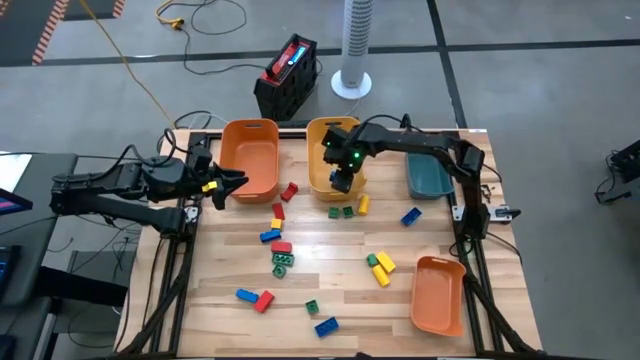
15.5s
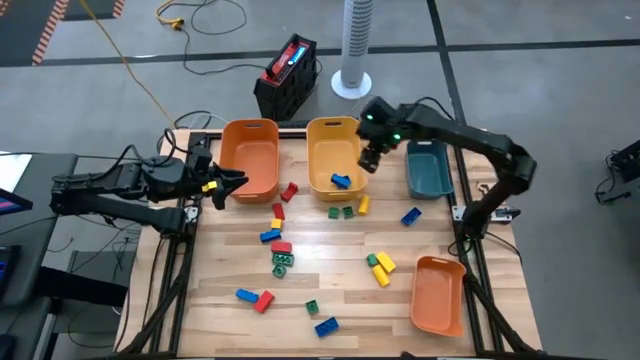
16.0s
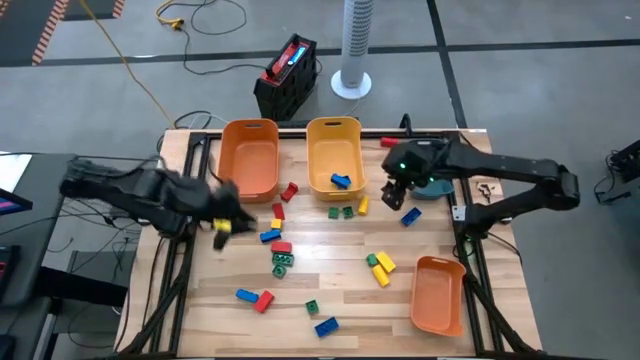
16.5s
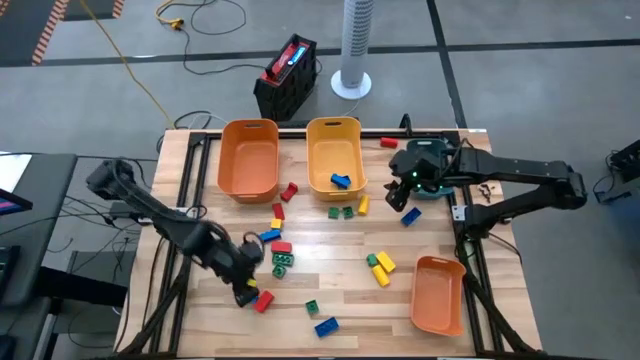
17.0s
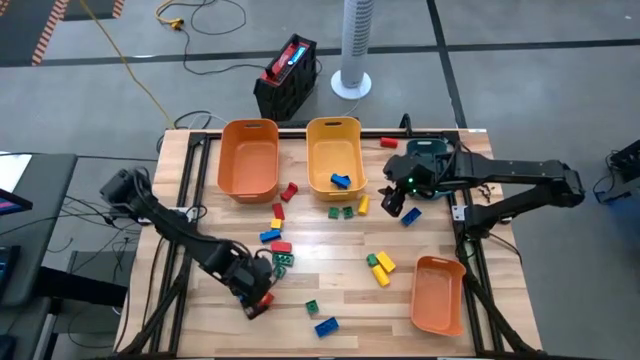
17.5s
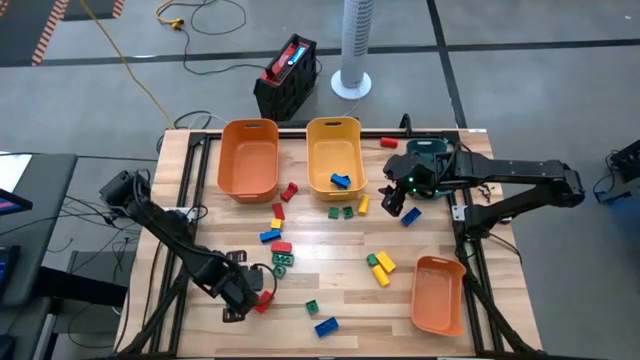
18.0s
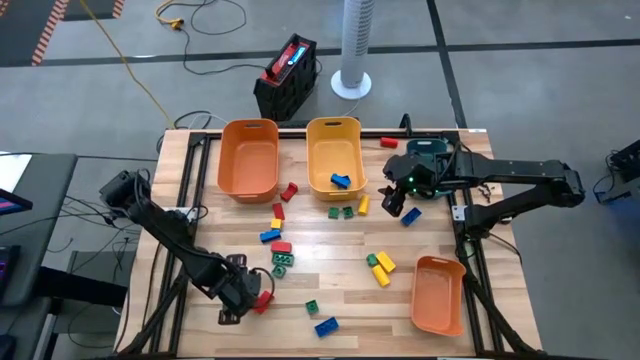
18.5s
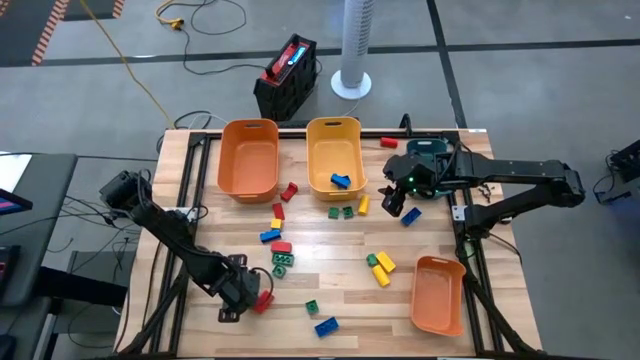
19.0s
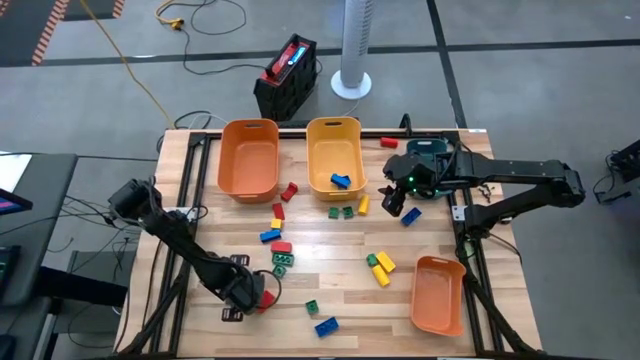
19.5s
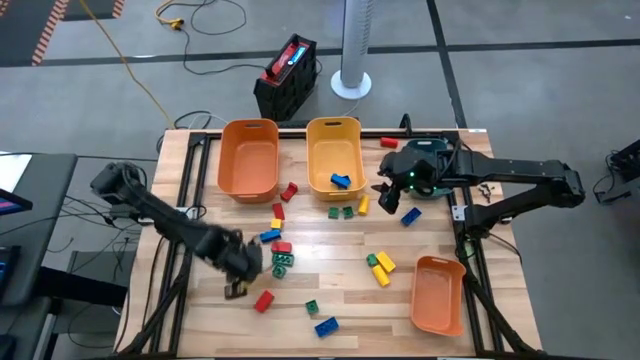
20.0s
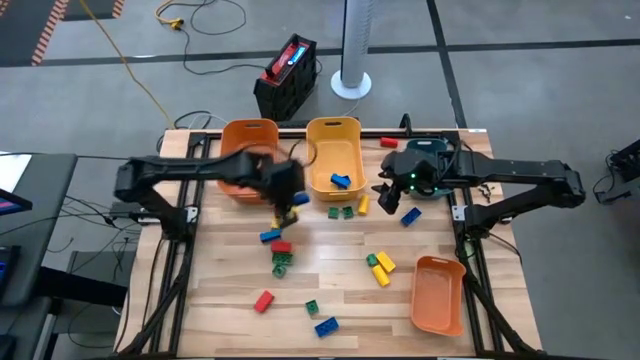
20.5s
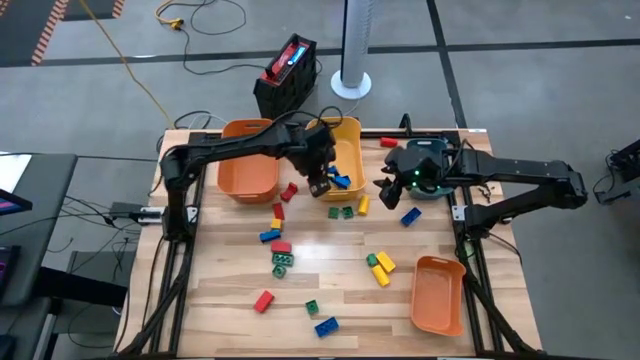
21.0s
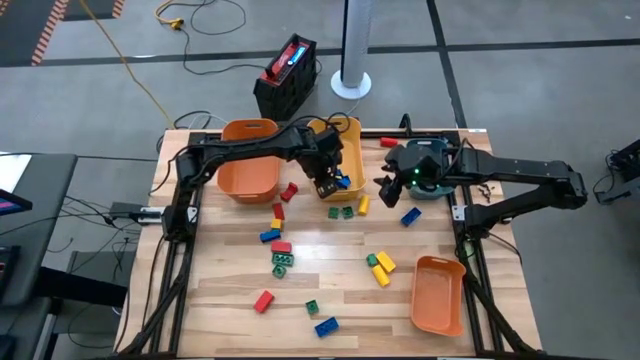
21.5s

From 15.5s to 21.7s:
Task: Sort blocks
Put the blue game piece into the yellow bin

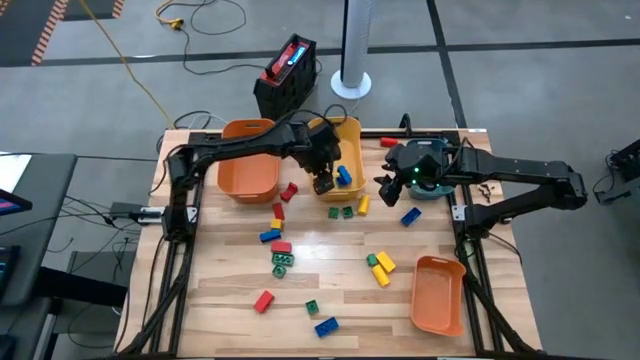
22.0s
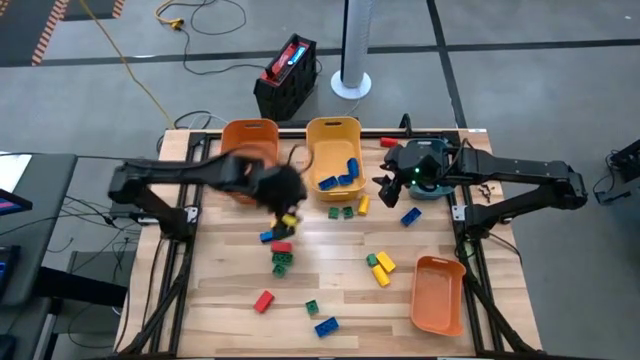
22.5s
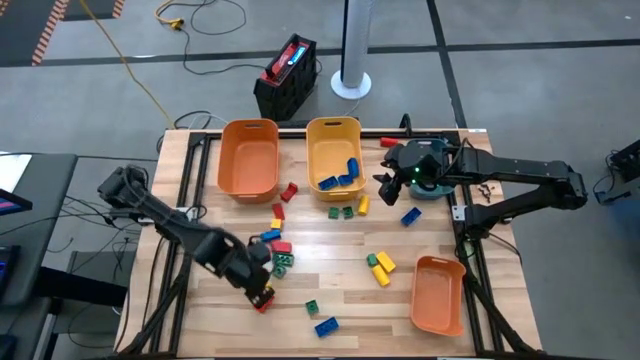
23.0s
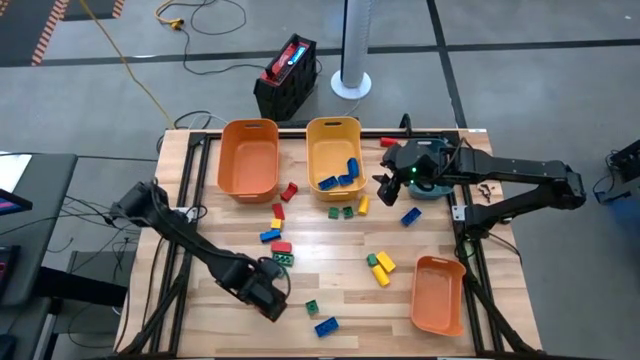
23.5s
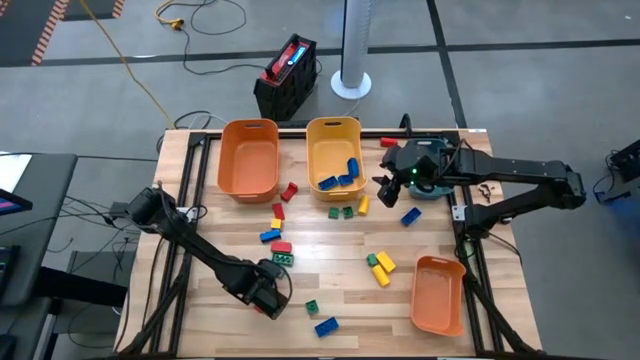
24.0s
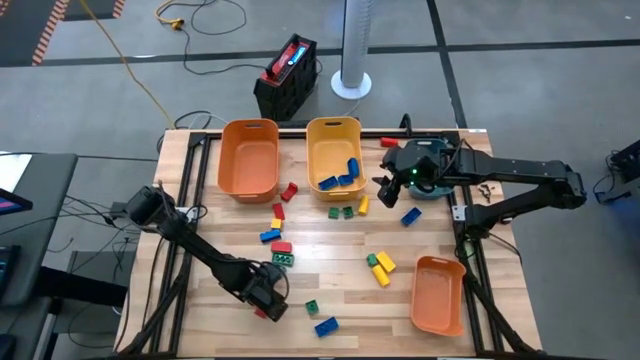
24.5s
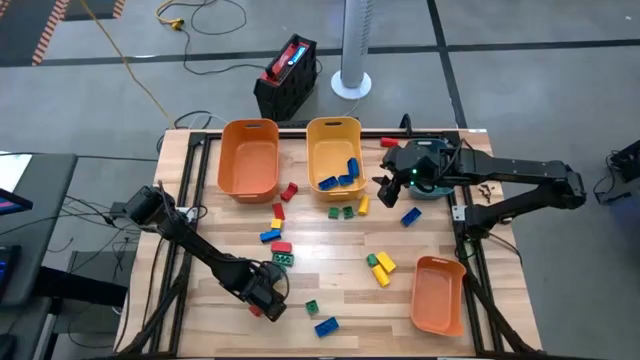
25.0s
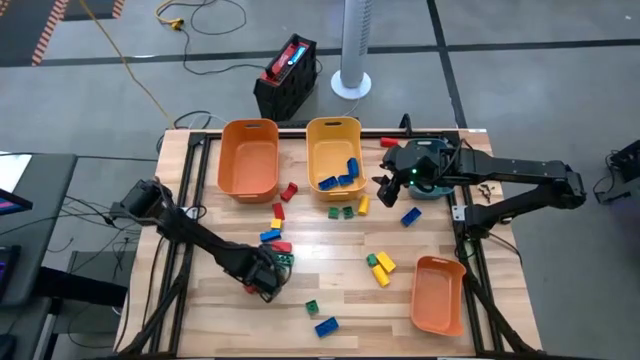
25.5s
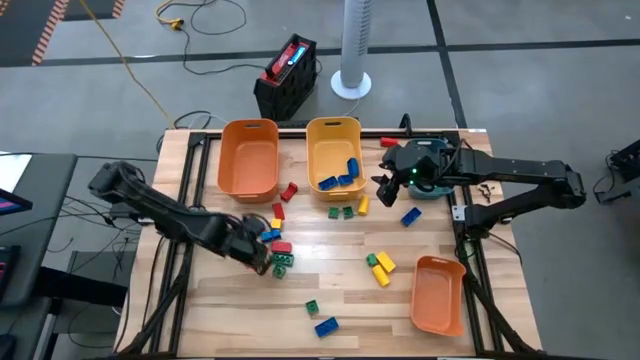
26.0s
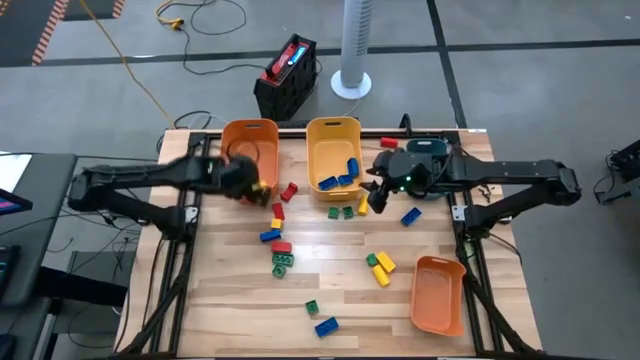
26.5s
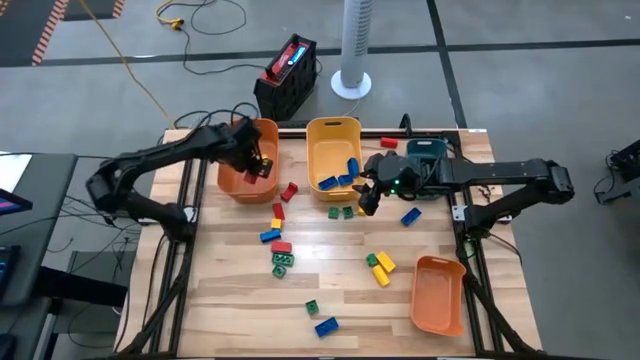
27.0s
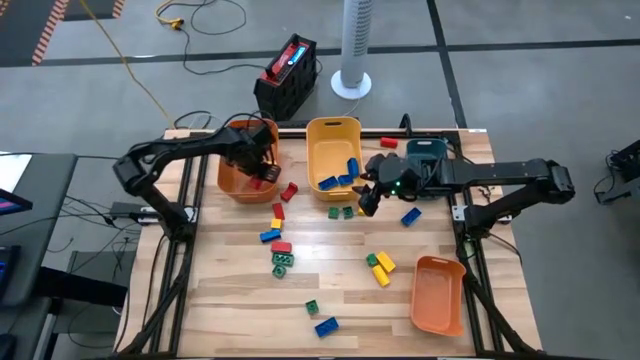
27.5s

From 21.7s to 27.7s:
Put the red block into the top orange bin

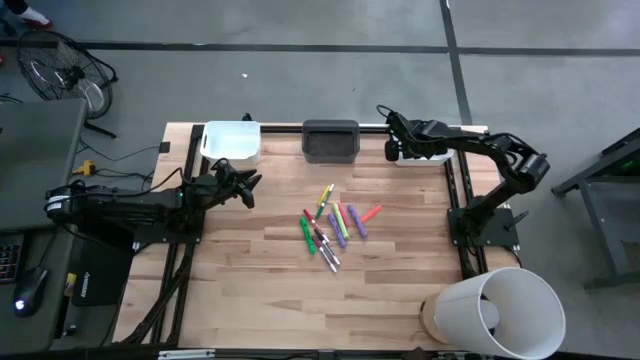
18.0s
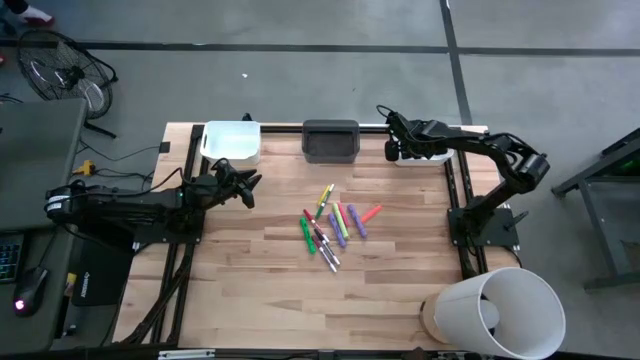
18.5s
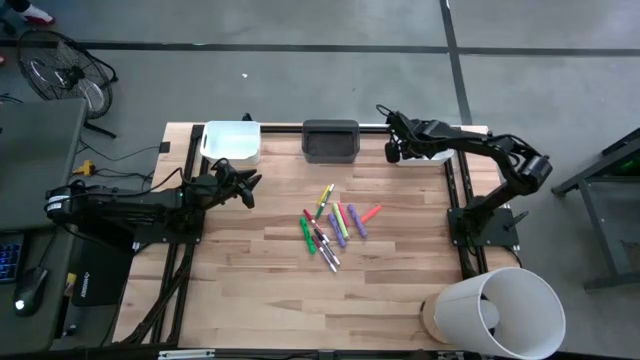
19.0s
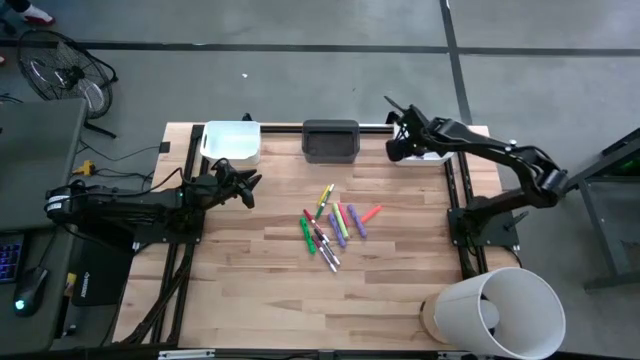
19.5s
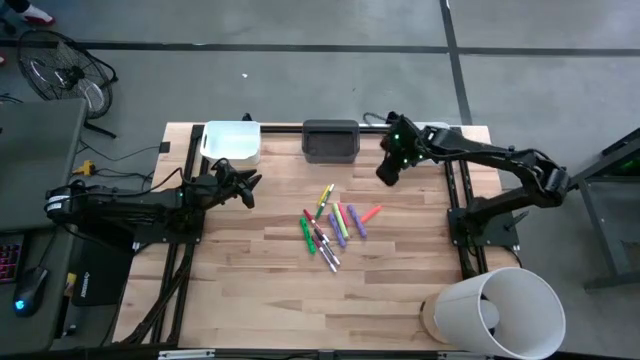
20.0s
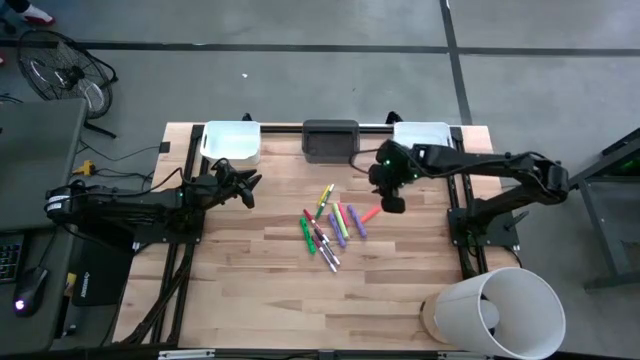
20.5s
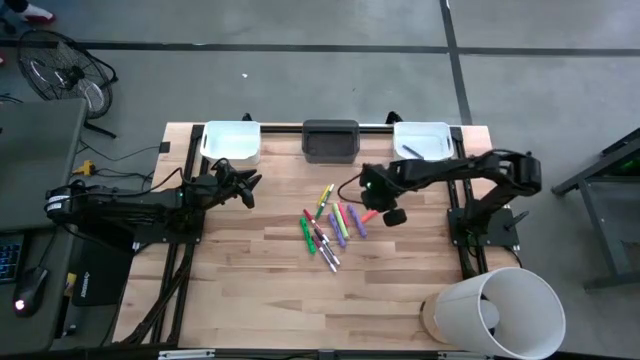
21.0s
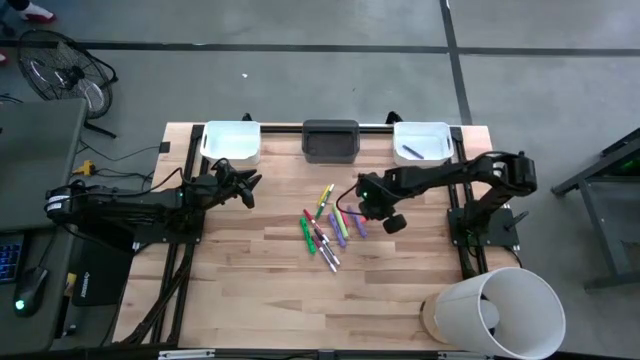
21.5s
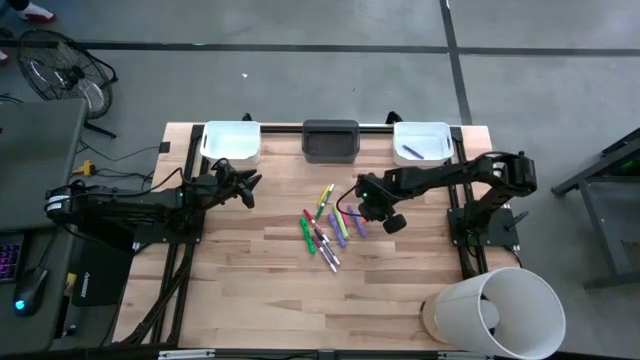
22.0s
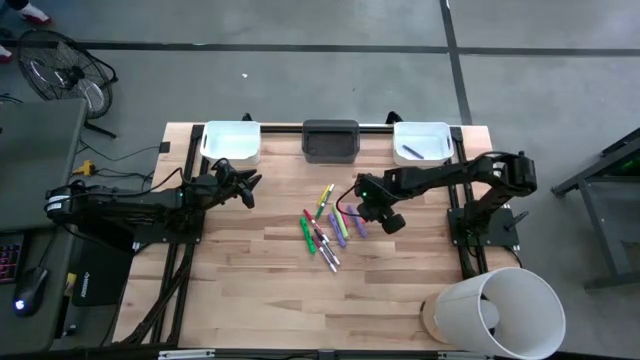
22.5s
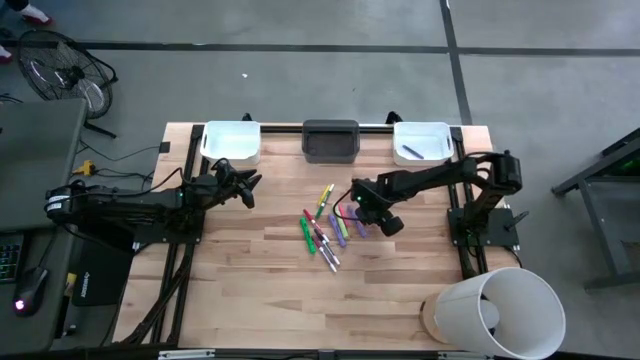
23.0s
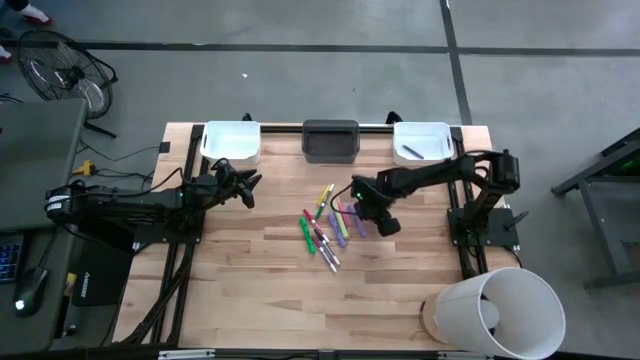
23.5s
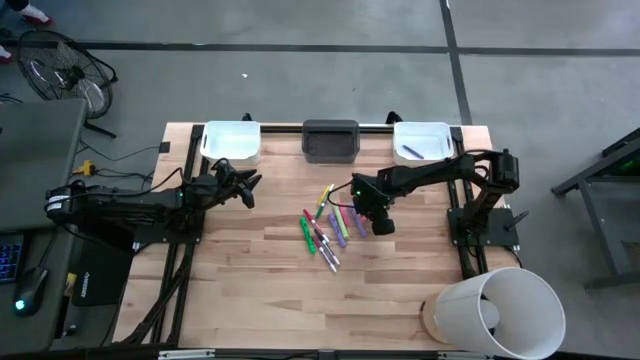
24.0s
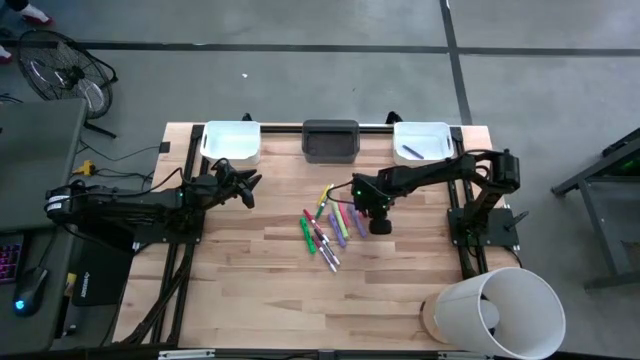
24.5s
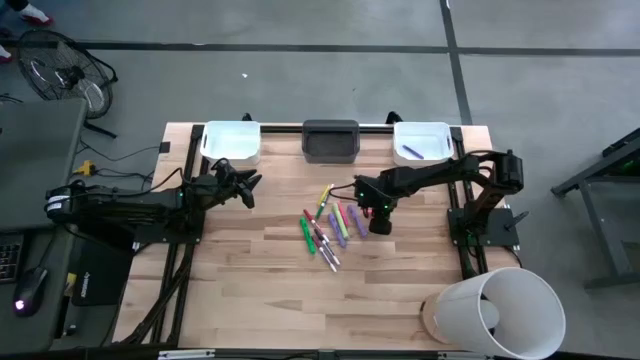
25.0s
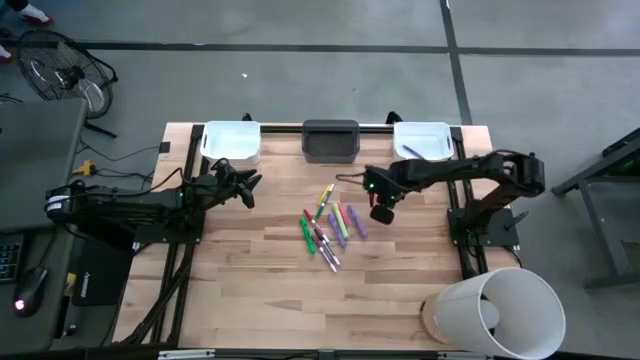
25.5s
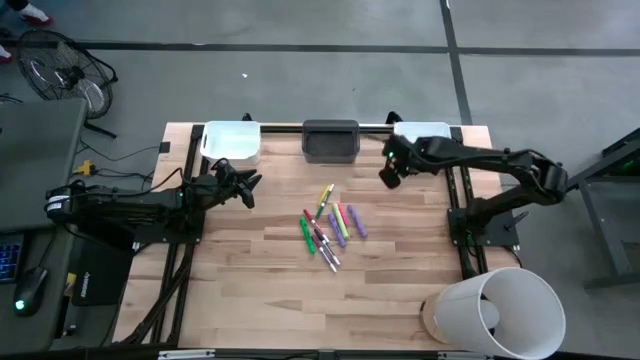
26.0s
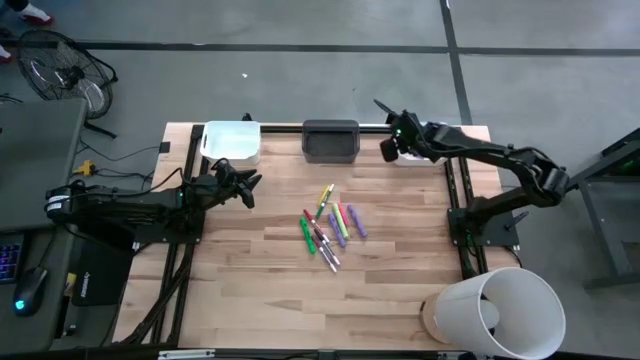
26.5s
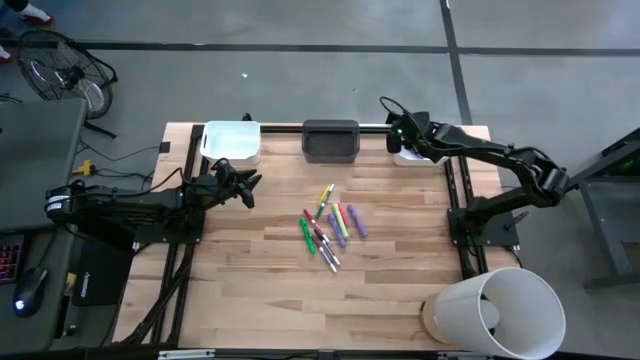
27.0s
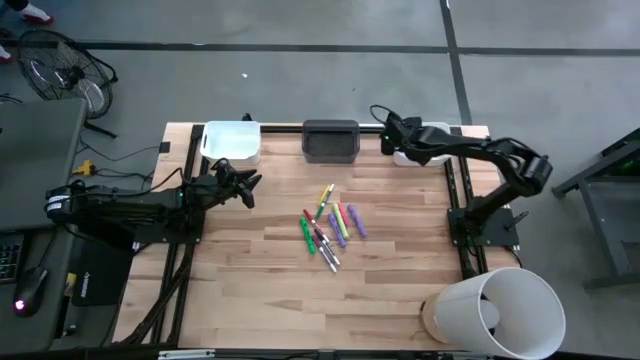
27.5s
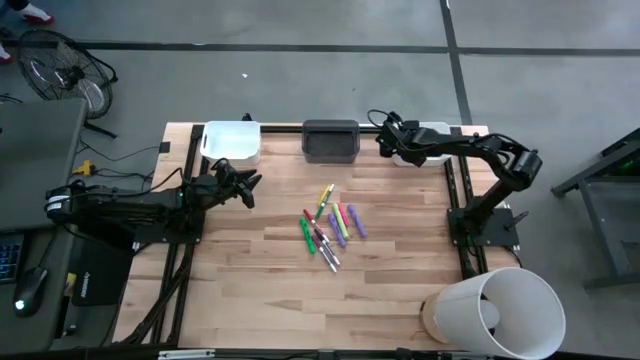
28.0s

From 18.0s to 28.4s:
Task: Pick & Place Markers
Put the orange pen into the right white bin
